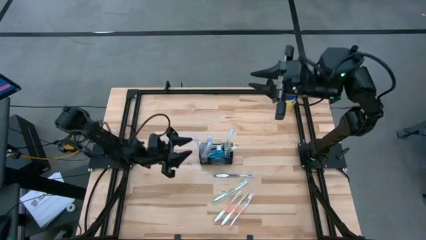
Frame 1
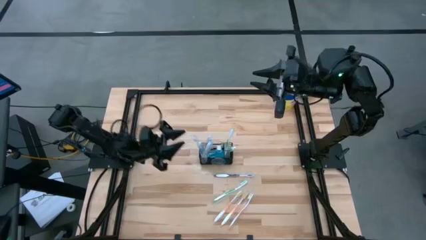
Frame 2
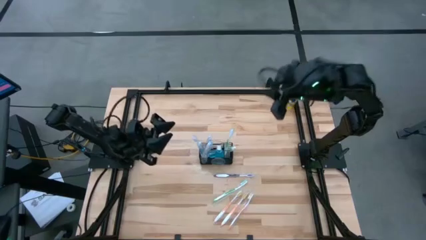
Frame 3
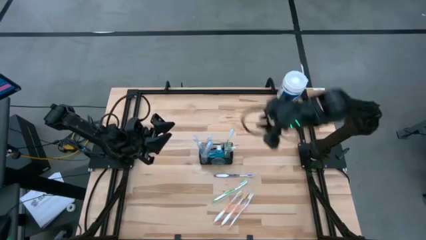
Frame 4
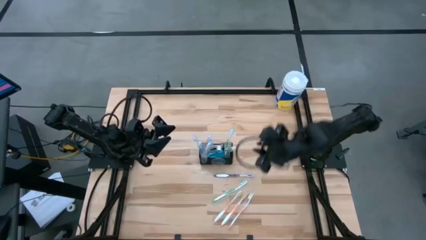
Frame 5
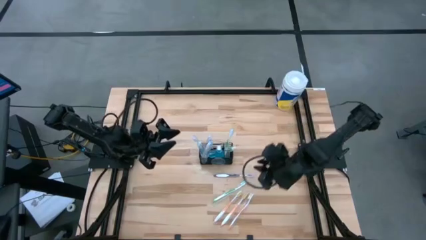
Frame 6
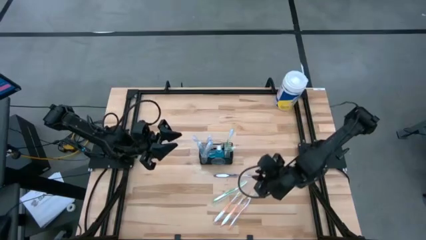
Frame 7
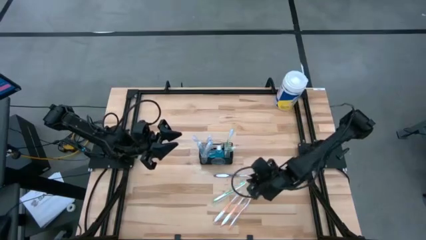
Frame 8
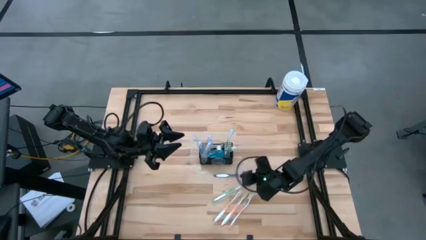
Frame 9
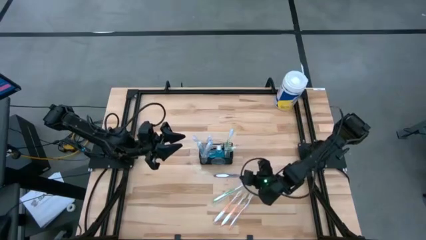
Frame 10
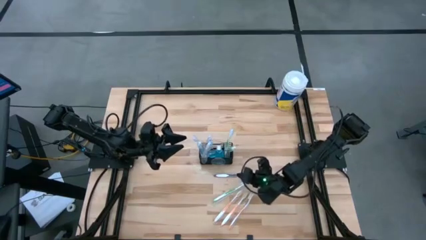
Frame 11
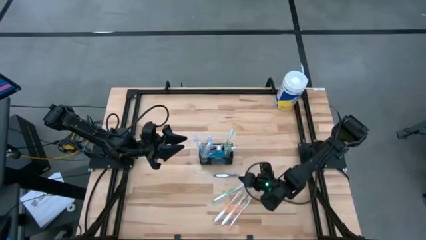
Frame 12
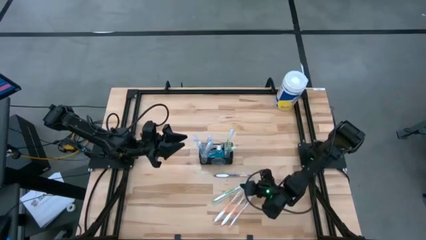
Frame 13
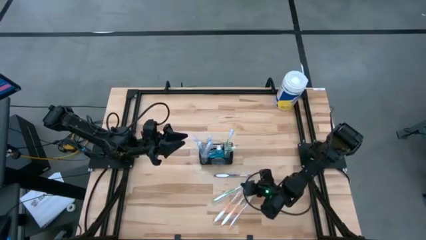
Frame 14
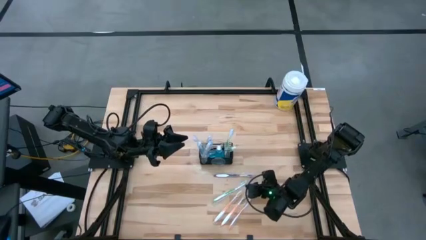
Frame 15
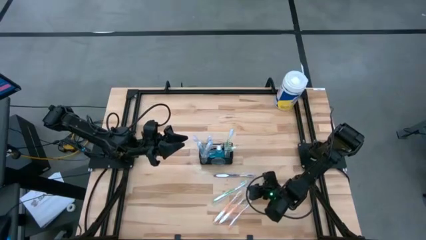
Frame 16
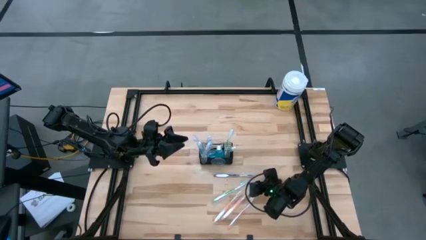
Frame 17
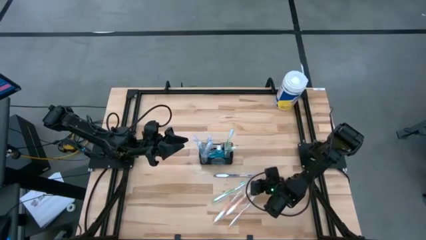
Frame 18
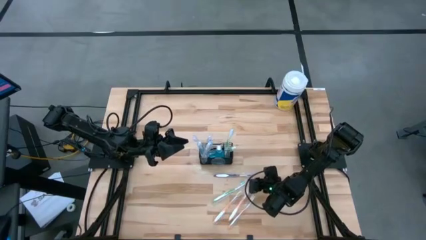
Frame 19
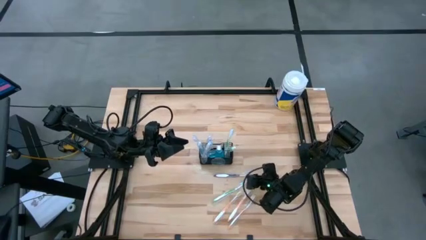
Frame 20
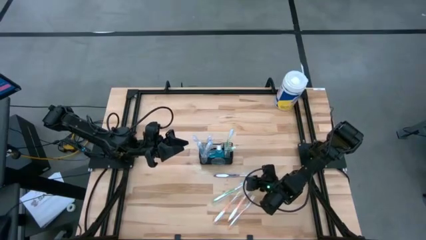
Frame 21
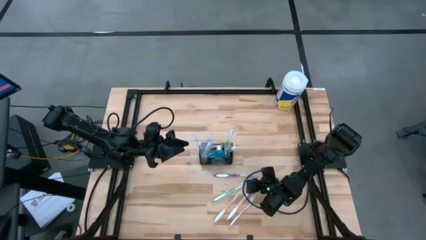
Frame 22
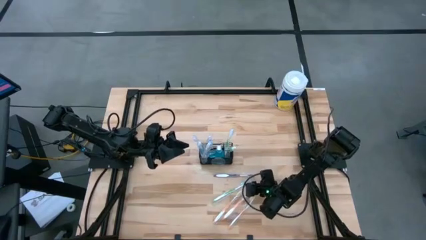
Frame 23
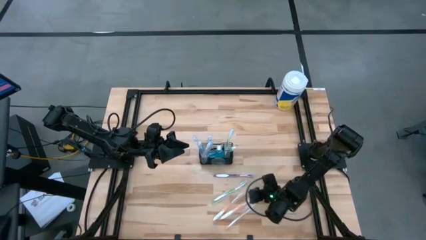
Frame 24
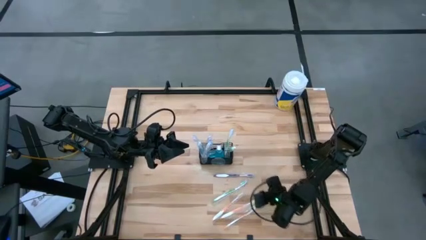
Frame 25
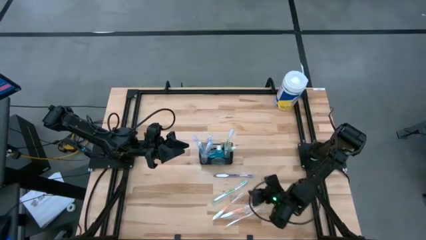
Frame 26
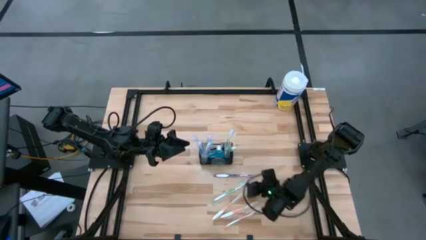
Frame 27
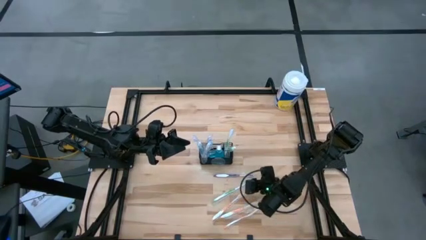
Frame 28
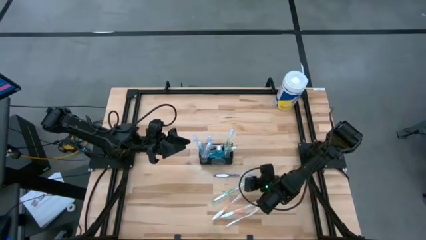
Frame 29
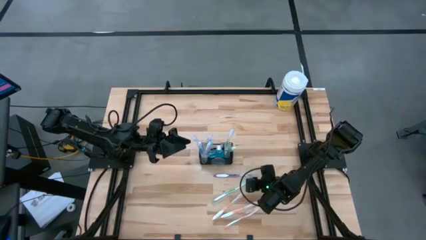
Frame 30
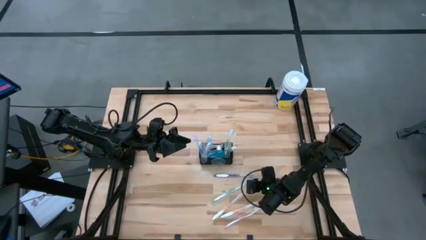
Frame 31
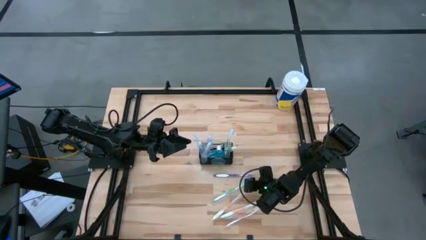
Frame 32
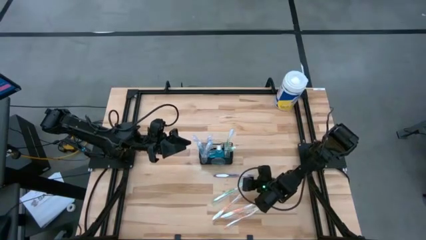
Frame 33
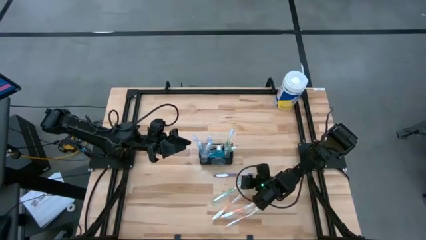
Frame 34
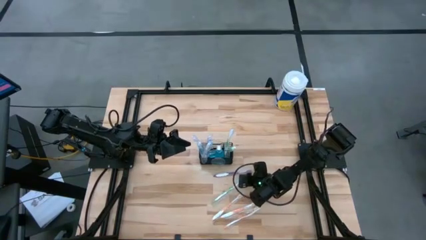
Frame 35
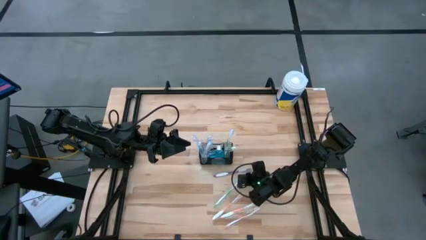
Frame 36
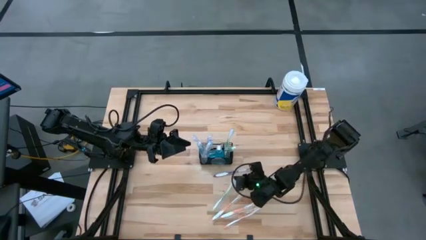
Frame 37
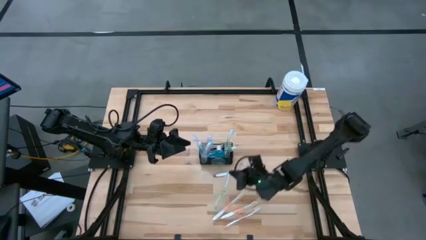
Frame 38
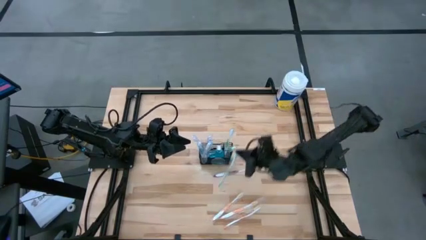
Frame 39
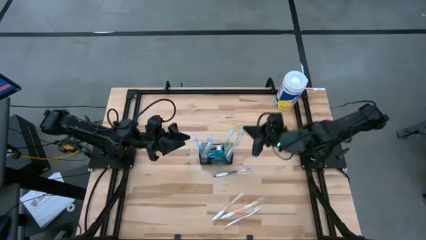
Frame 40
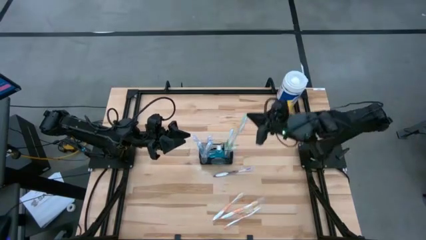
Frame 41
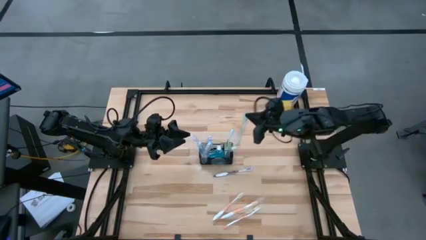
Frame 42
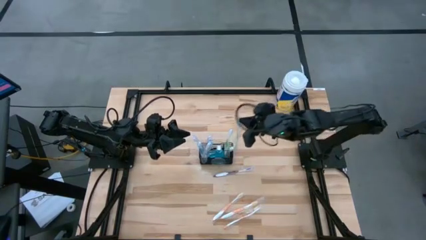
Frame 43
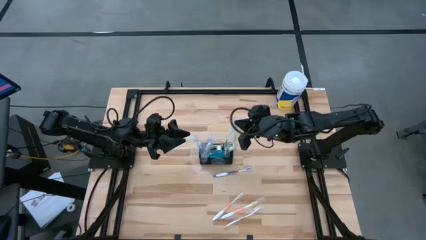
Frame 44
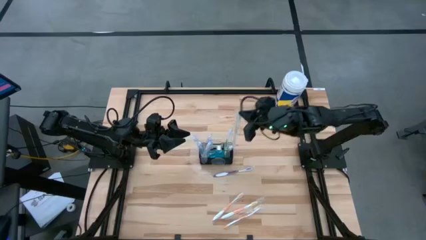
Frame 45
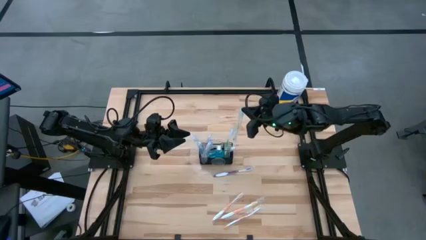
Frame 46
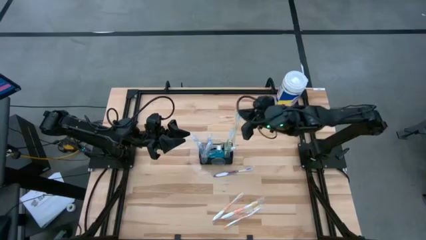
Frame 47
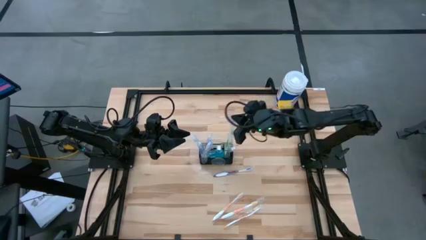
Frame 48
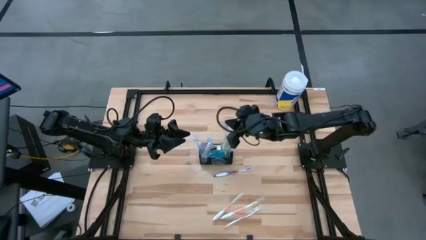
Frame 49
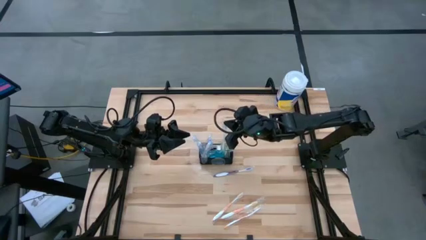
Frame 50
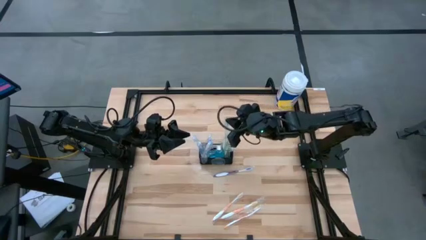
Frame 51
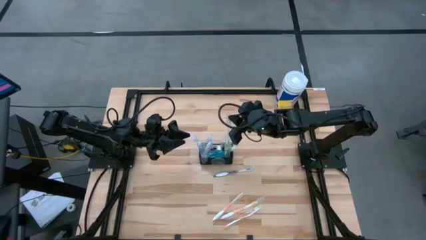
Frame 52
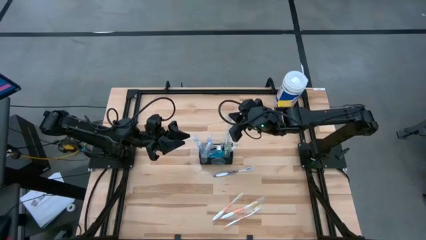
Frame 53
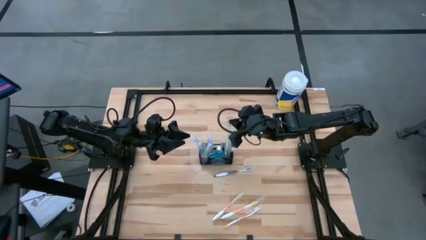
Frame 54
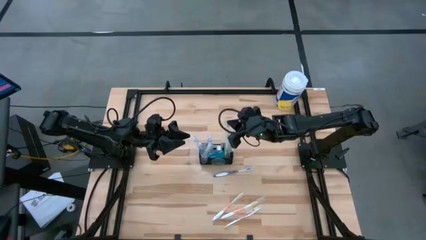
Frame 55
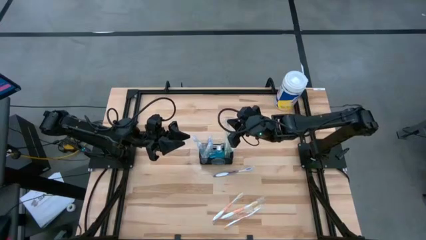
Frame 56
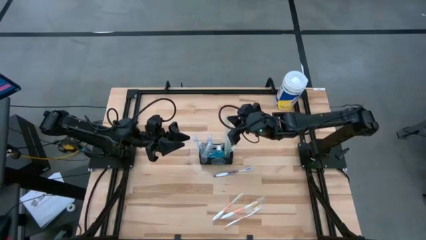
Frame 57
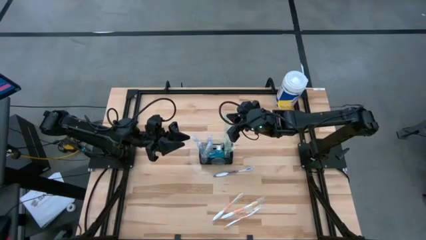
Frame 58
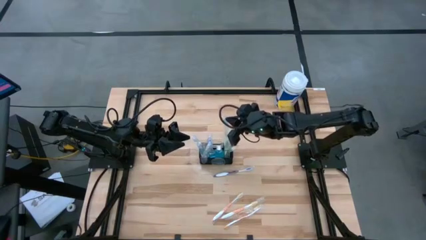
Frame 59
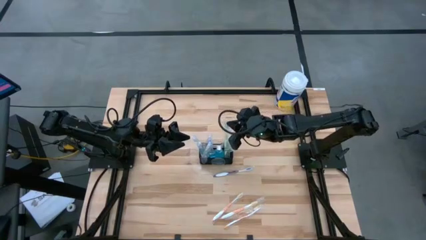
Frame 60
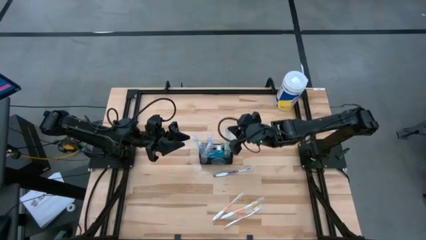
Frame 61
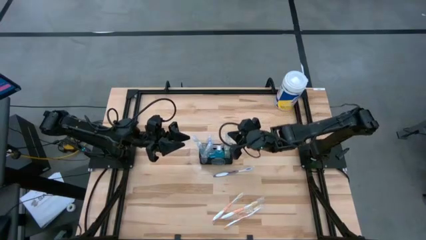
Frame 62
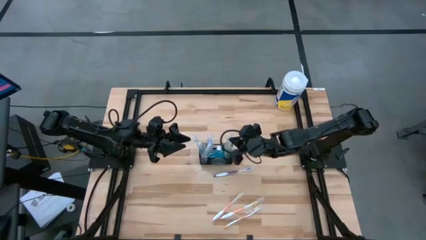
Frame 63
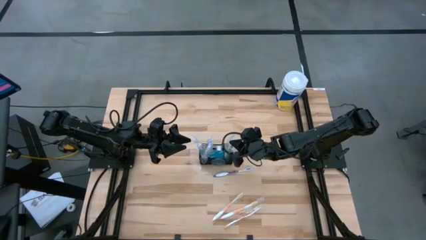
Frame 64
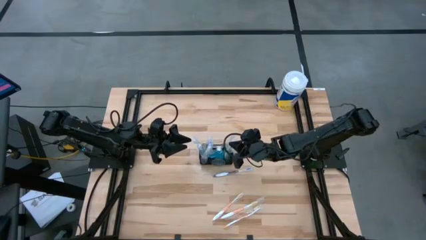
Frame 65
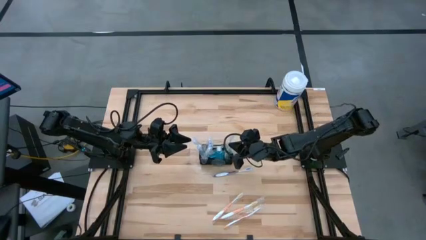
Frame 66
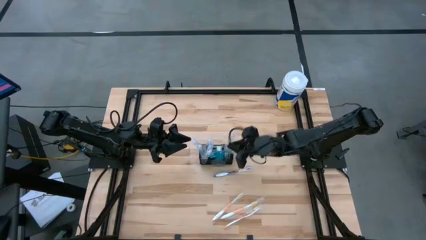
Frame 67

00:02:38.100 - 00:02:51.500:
Task: Pick & Place toothbrushing station
Put the green toothbrush into the black wire organizer

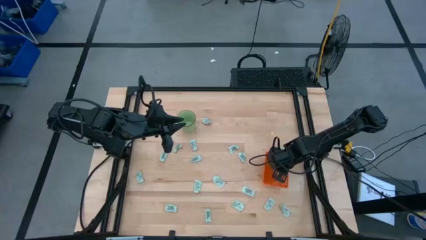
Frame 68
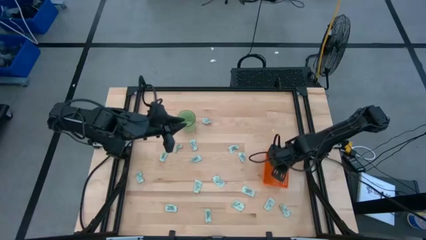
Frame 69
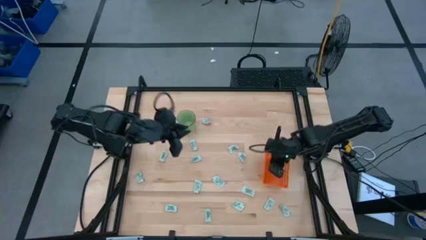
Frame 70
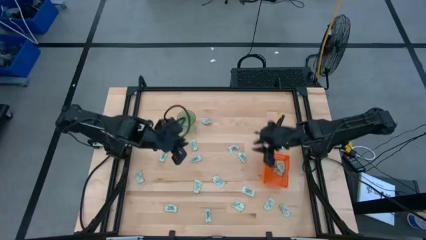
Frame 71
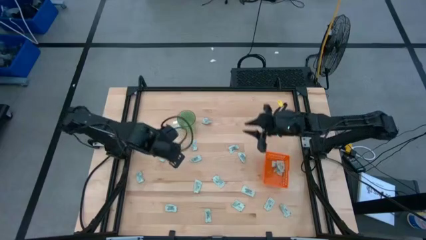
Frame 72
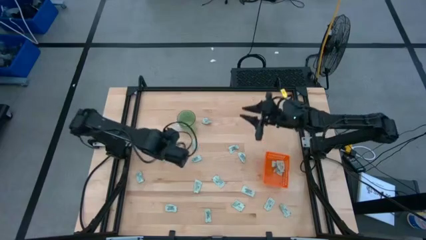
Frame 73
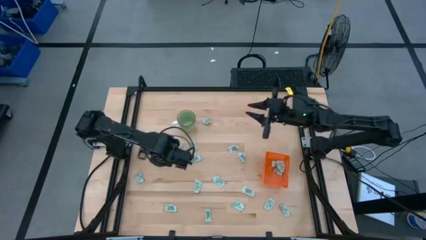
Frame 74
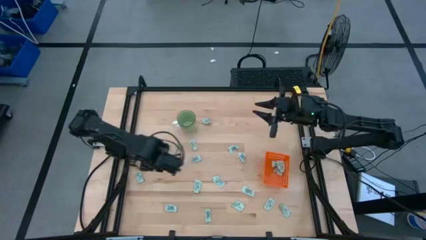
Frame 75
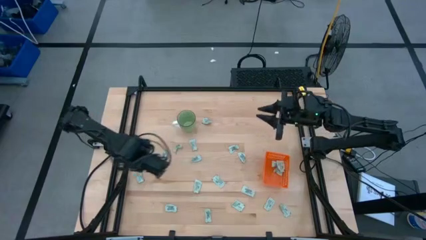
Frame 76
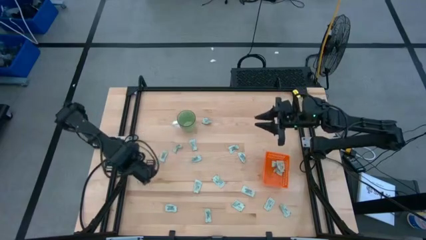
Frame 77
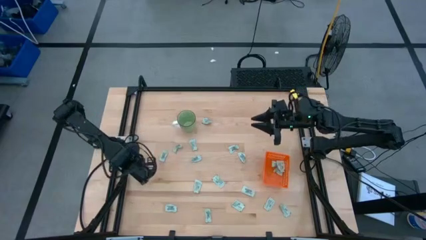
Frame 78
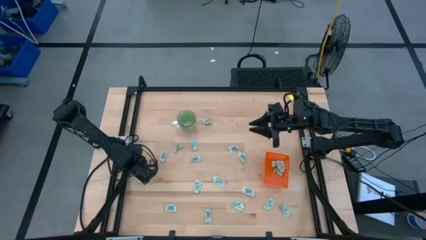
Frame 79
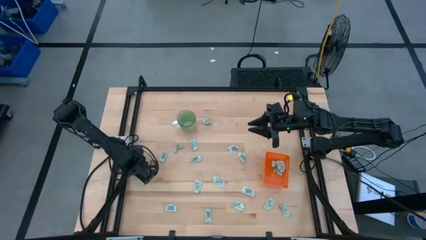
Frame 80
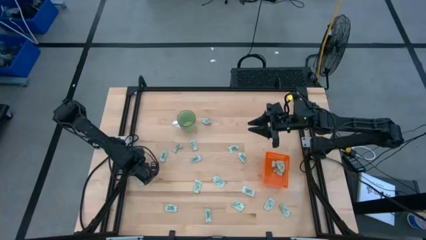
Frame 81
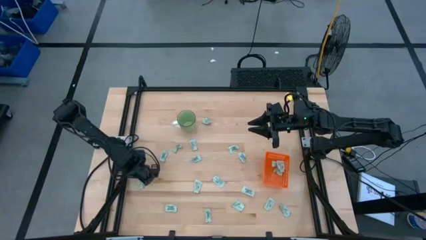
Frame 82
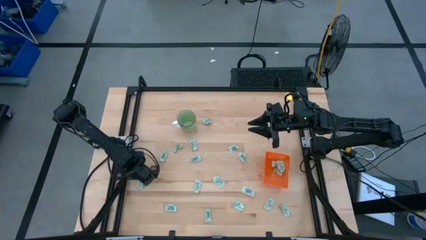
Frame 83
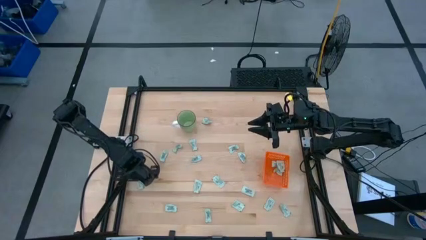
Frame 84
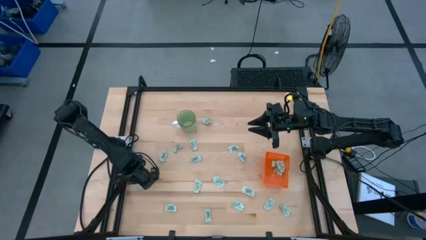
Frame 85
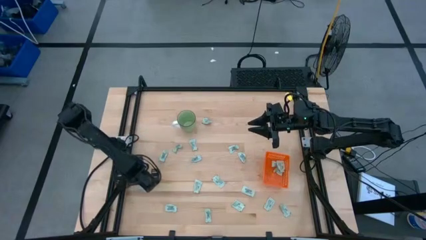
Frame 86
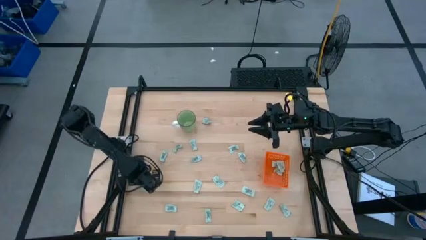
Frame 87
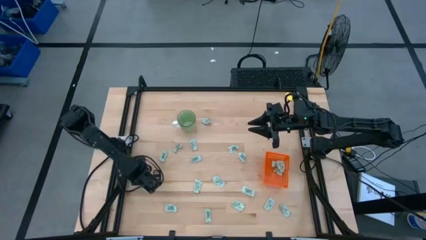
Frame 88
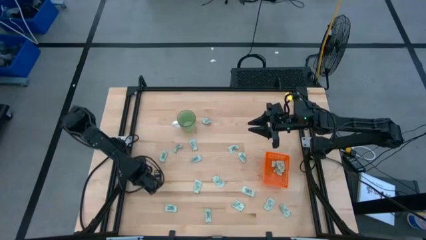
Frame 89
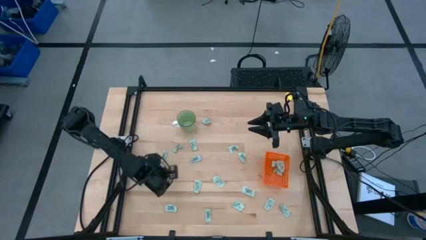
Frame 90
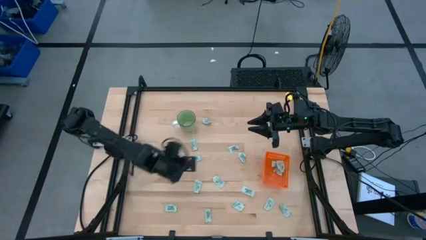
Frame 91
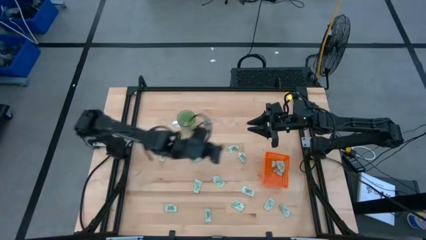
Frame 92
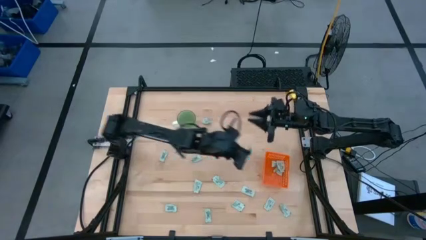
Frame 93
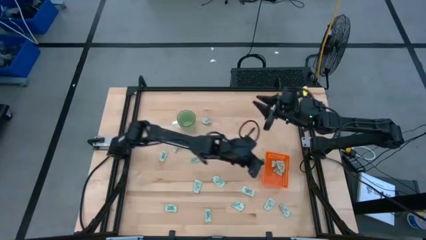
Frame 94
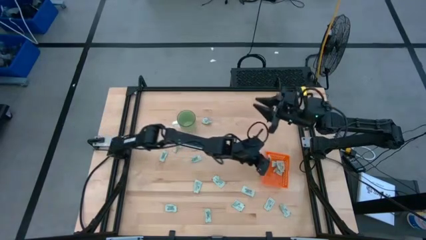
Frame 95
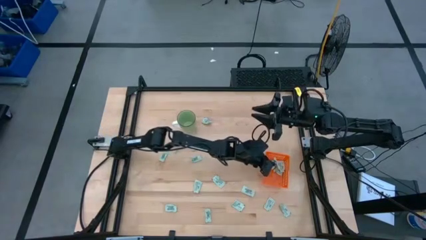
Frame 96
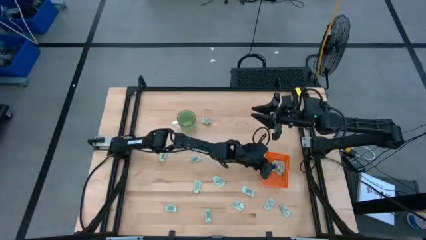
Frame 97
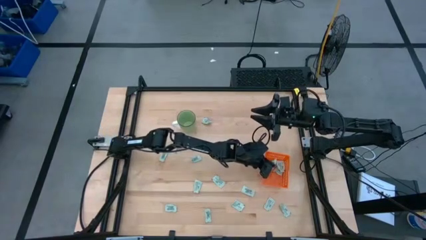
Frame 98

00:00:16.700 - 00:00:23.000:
Task: Pick and place Stevia / Truvia into bins
Put the stevia packet into the orange basket
